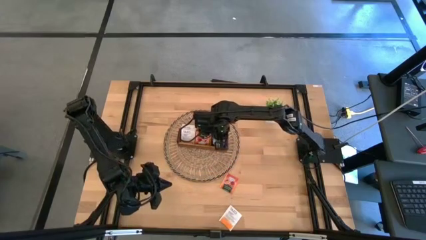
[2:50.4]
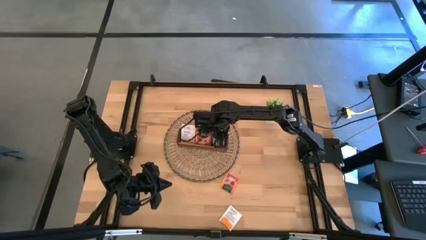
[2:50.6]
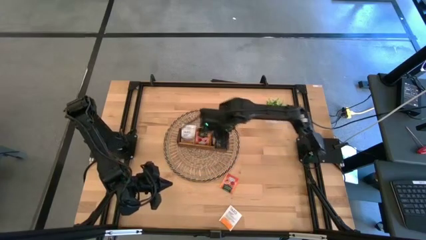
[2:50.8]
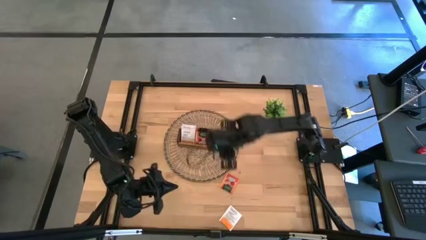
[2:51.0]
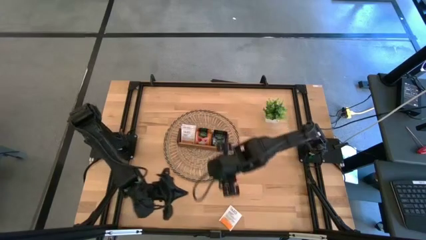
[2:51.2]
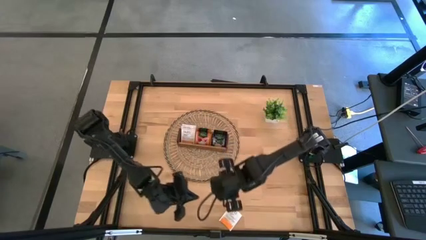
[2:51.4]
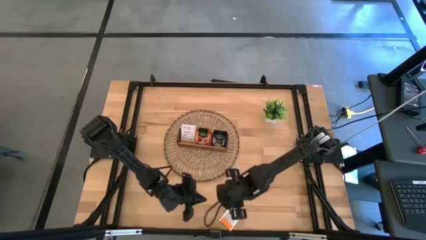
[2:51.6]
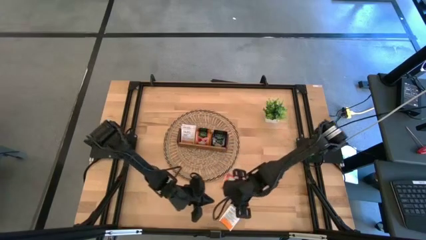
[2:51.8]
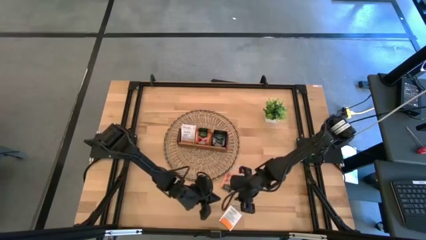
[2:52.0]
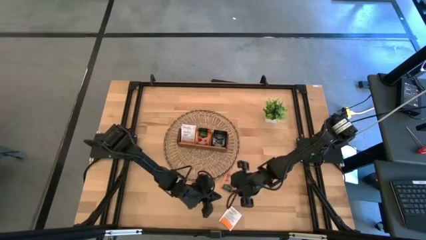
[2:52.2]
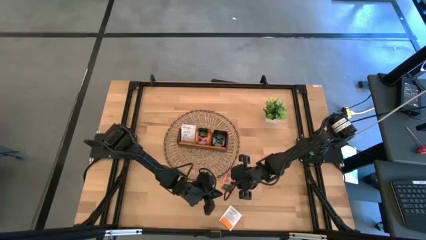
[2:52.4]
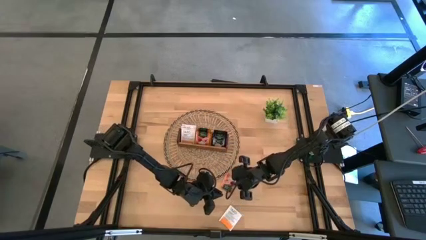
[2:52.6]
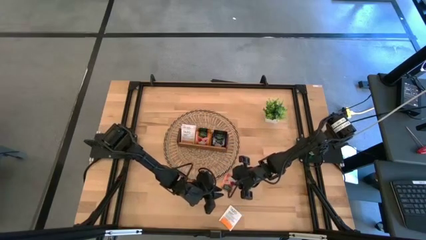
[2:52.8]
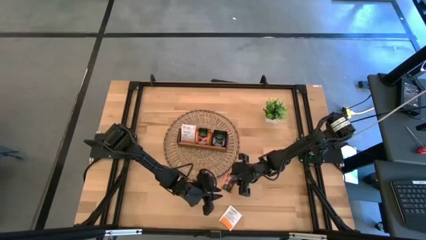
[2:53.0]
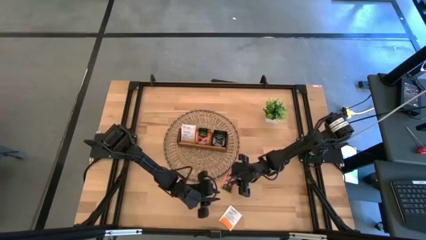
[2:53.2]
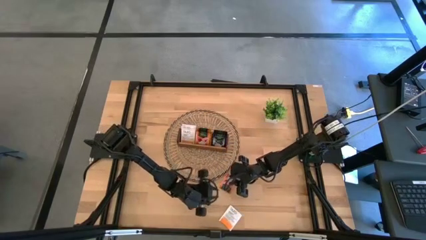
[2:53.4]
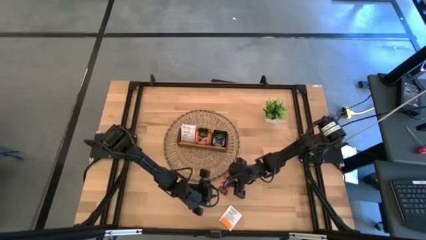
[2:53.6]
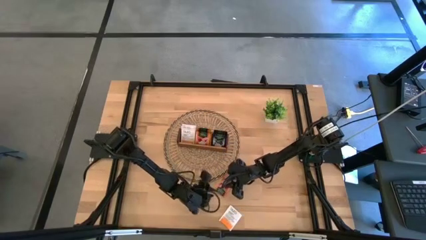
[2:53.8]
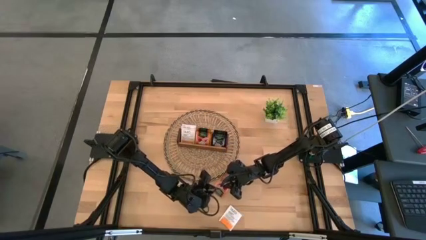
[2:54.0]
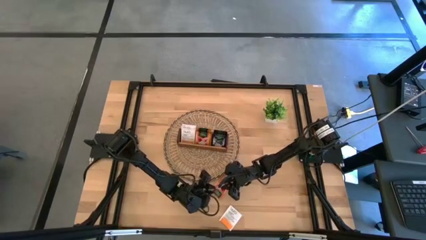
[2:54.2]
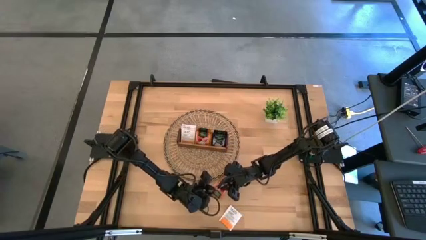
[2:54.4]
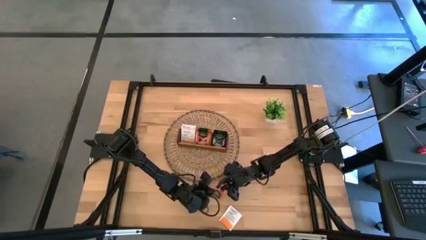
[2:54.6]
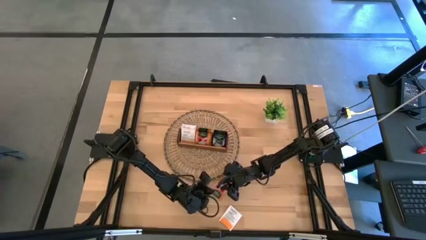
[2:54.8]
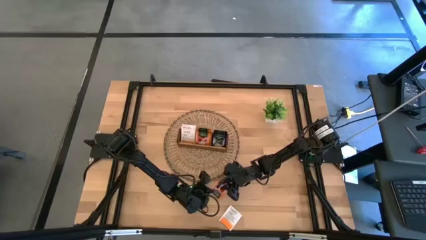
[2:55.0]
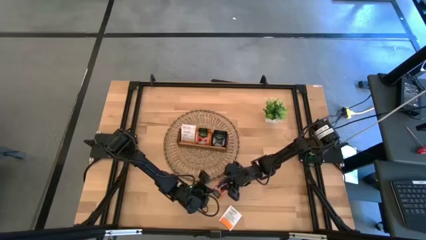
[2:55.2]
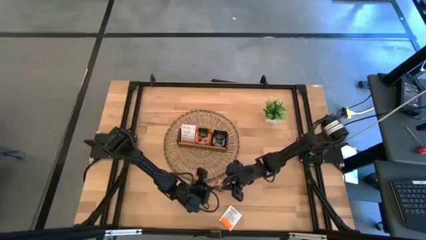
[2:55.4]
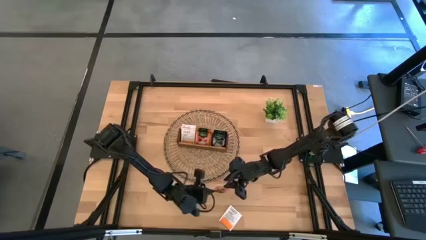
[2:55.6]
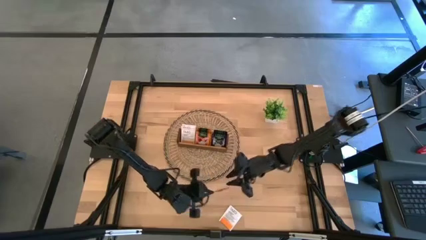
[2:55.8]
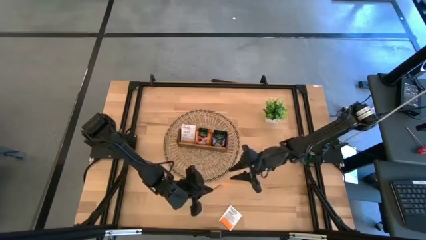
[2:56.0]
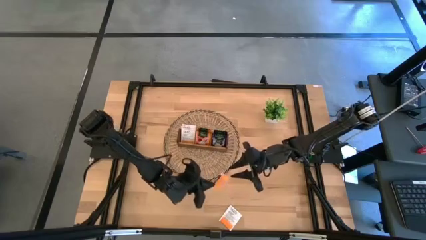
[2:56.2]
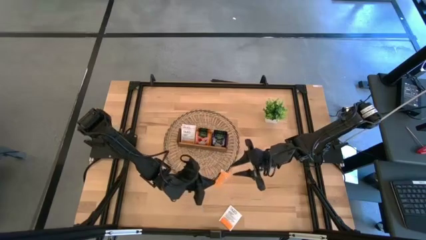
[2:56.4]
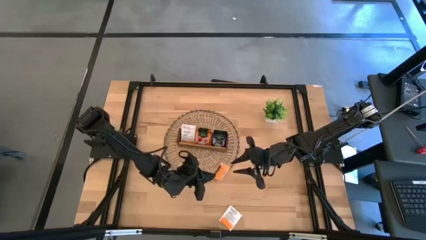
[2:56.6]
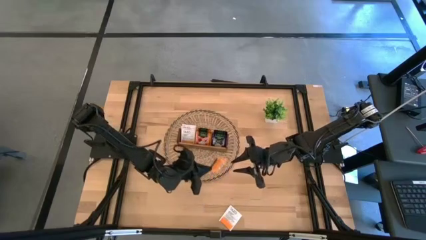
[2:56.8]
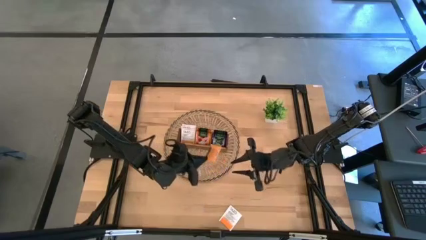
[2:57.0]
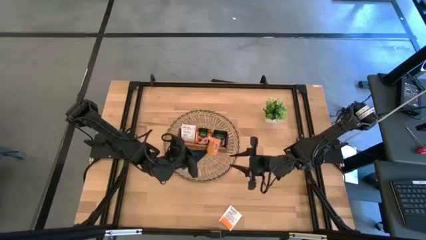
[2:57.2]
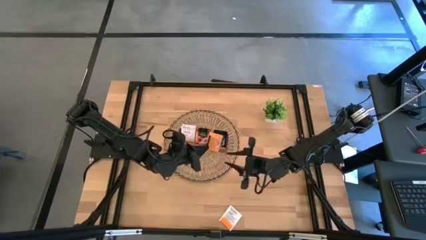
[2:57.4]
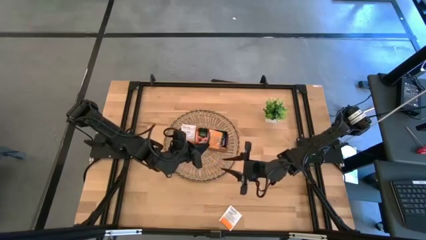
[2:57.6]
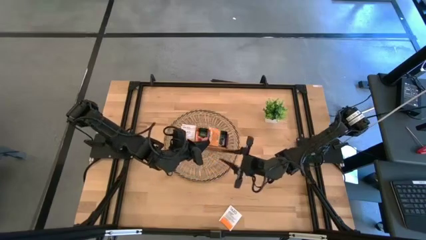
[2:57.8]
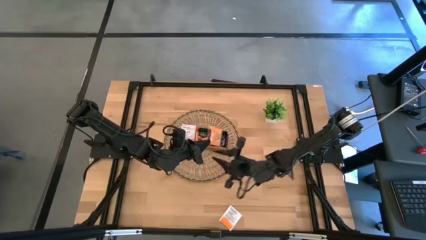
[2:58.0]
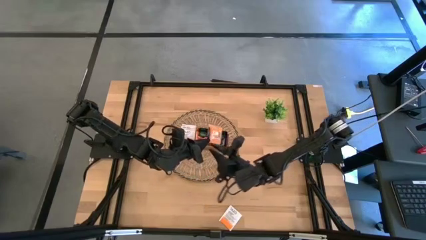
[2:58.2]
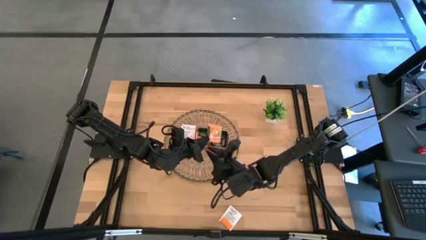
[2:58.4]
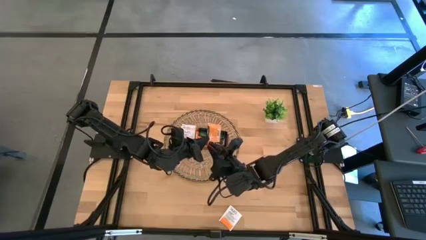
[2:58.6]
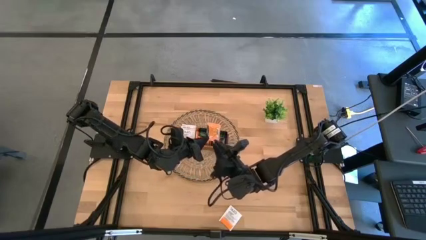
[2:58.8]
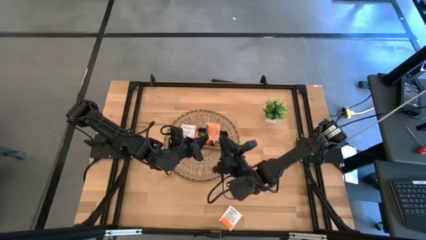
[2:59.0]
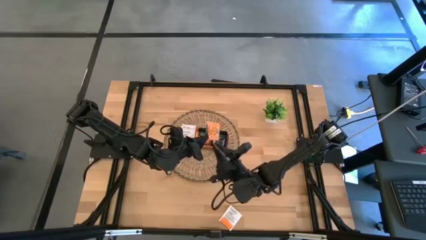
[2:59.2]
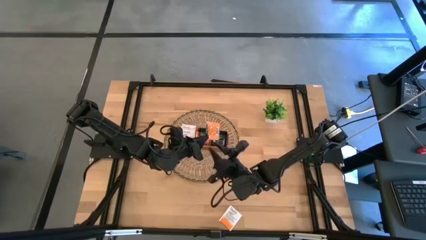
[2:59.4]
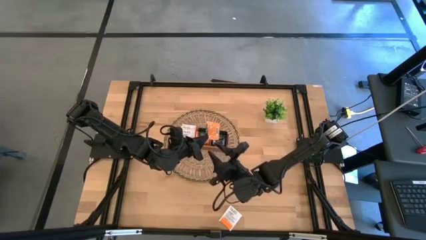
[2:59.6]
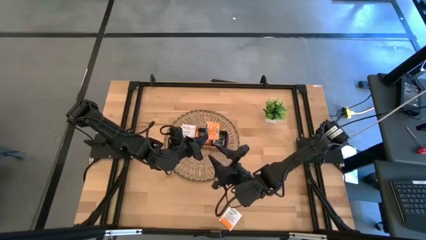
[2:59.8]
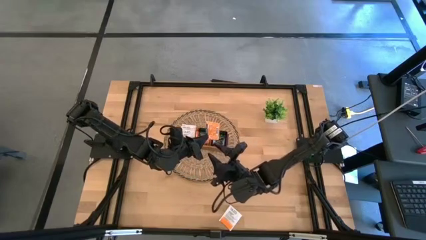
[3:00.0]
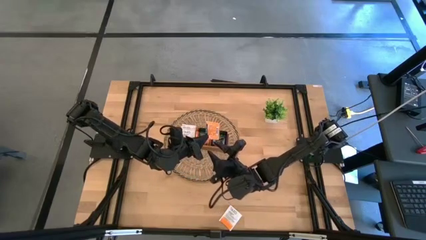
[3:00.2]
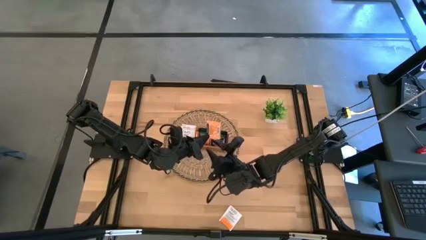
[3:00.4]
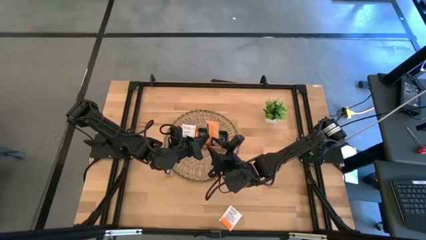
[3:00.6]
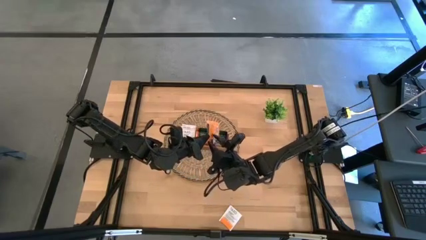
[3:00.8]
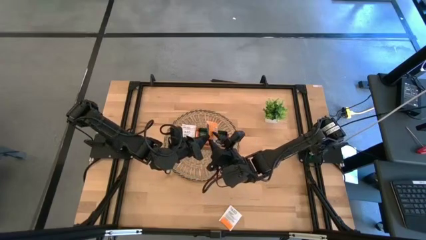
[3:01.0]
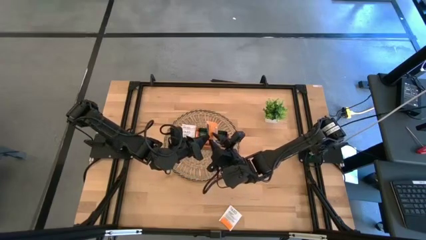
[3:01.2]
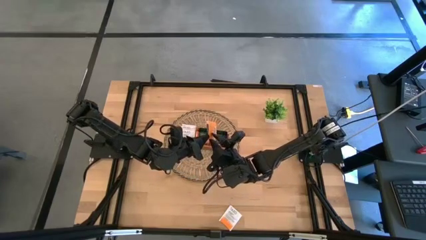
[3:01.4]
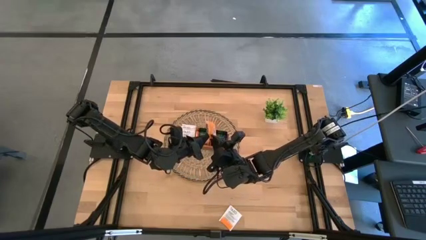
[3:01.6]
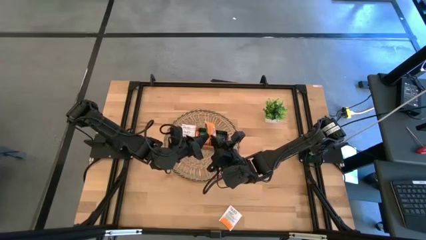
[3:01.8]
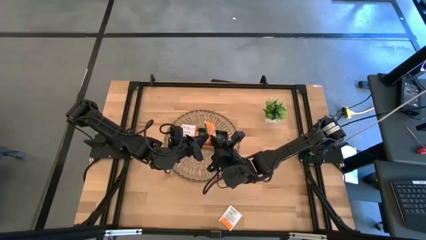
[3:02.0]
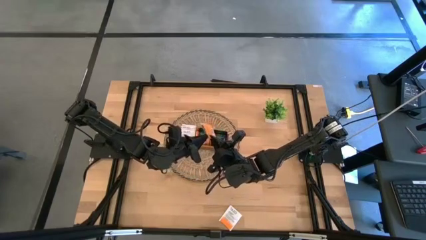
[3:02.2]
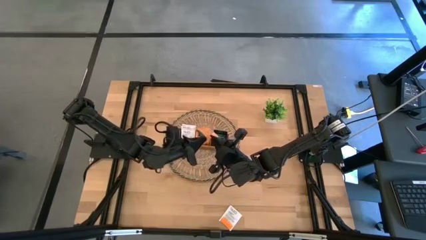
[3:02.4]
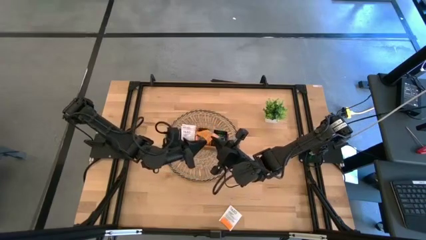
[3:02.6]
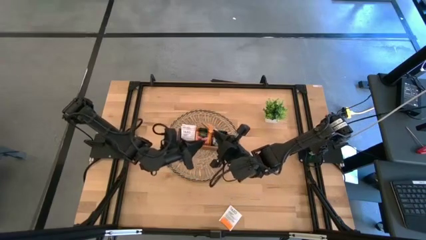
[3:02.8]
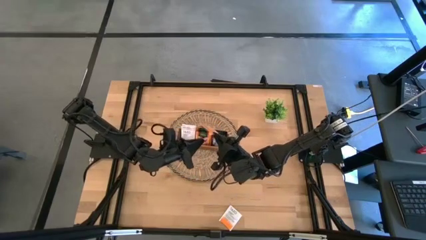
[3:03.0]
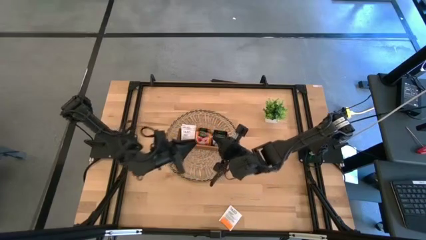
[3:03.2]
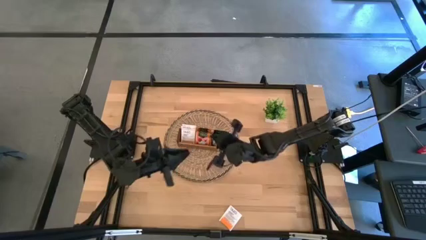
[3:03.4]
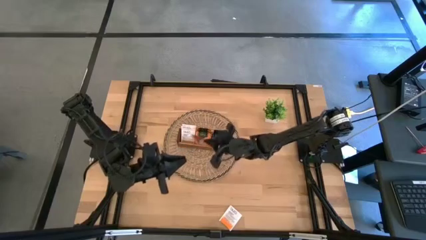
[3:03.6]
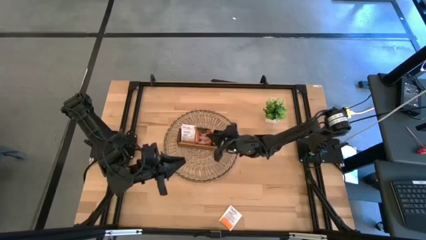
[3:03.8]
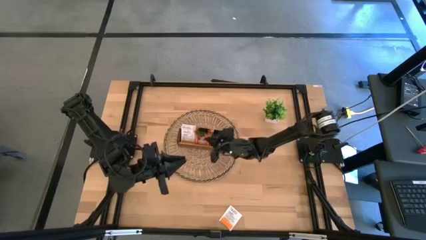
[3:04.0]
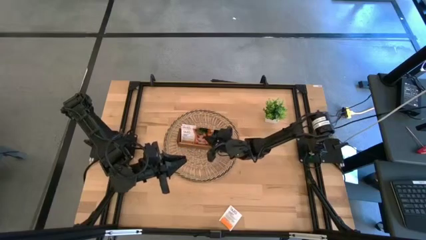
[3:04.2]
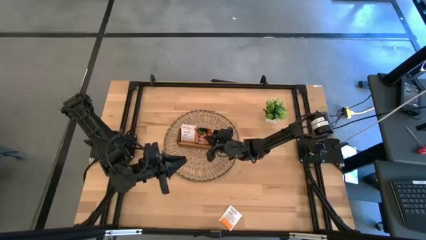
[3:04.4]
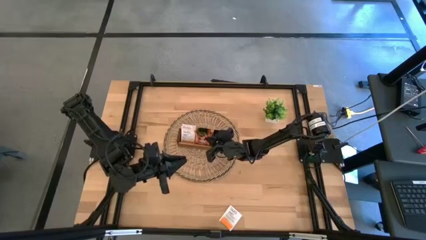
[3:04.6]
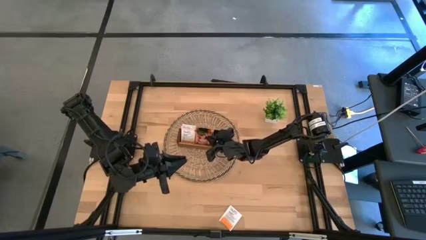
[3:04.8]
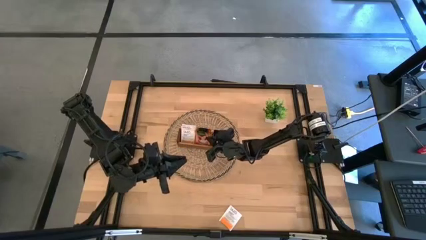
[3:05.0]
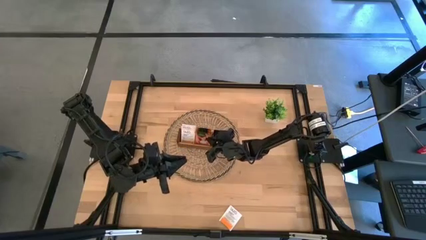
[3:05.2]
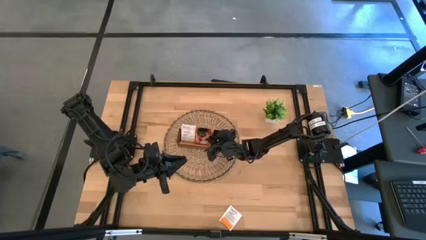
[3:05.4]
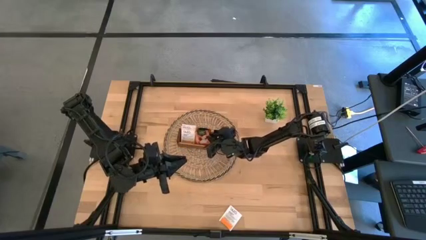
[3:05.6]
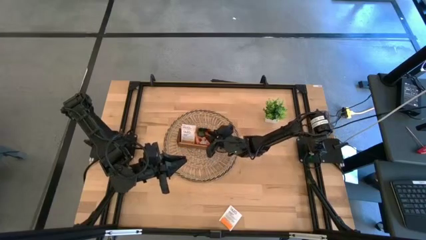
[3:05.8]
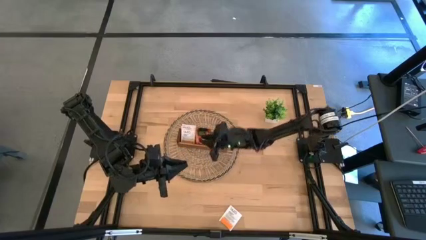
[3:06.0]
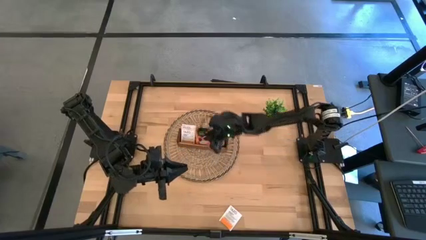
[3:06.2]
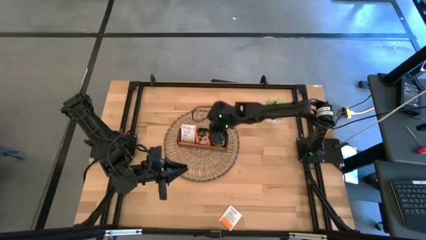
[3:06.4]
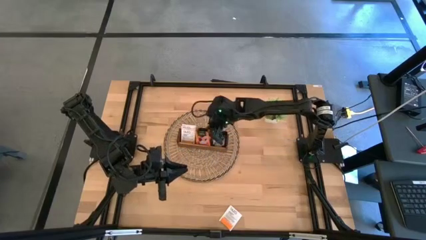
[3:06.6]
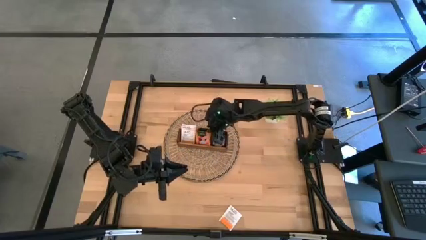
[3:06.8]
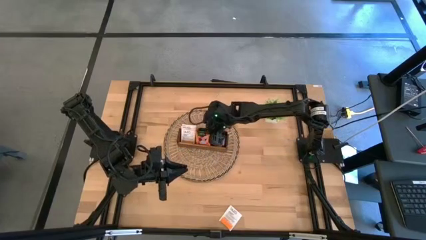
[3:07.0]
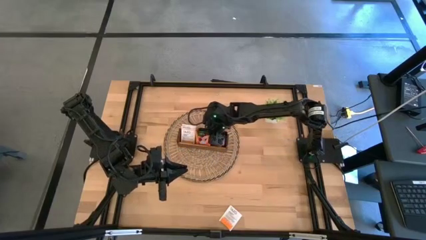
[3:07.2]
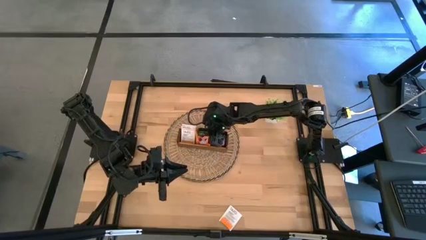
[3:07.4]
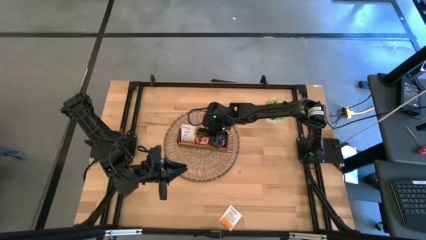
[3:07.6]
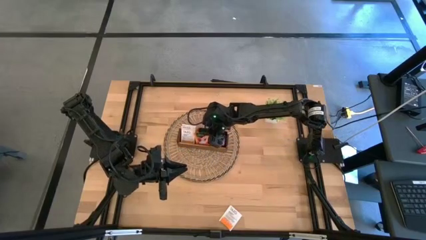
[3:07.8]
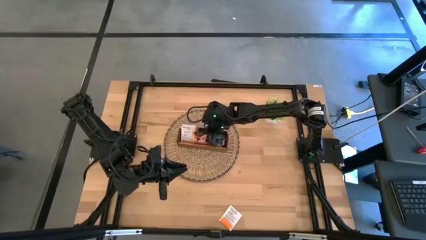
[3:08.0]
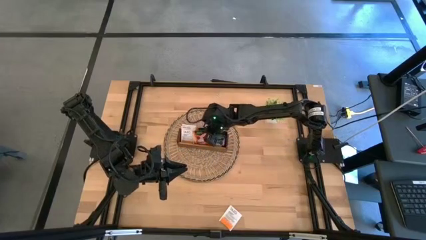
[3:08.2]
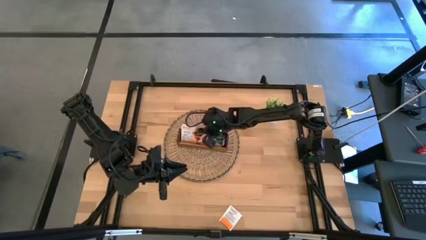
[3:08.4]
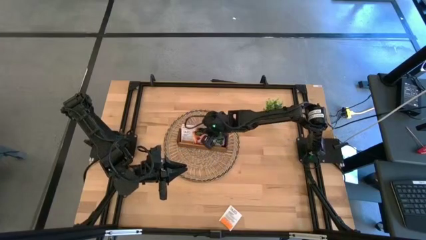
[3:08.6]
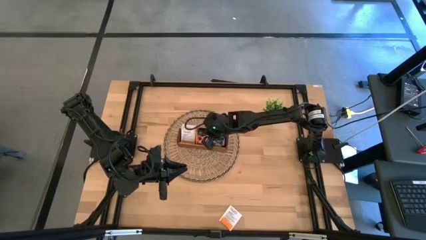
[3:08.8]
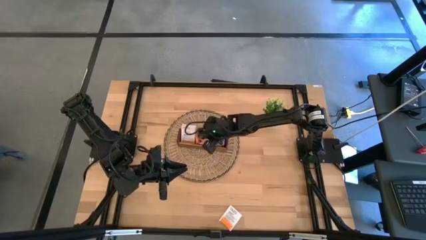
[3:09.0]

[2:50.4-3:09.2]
Task: Pick & Place Tea
Put the orange tea bag into the middle section of the wooden organizer
